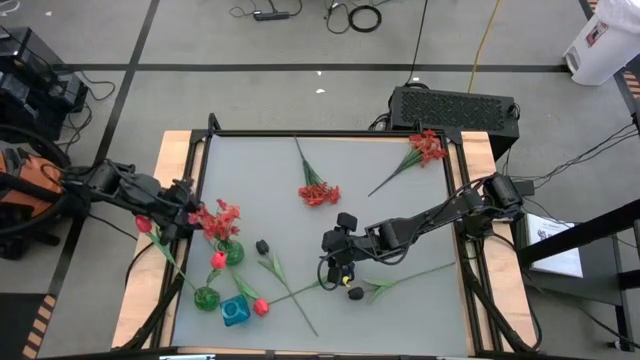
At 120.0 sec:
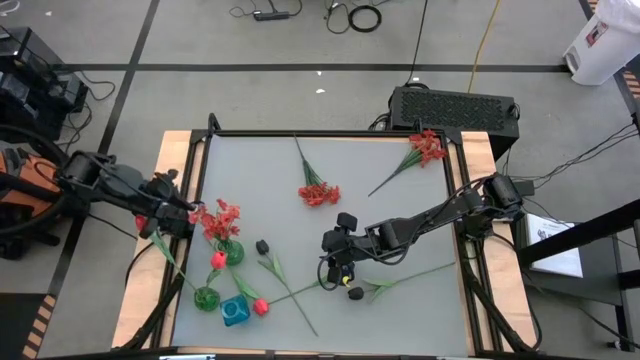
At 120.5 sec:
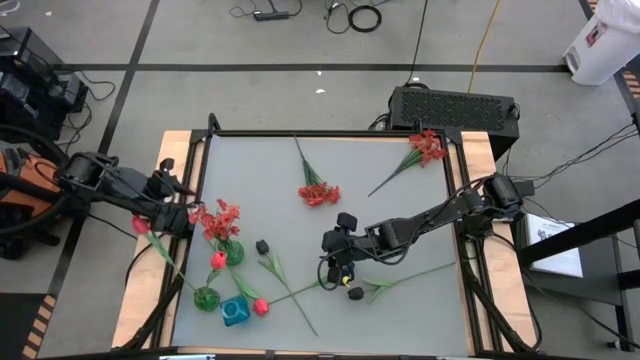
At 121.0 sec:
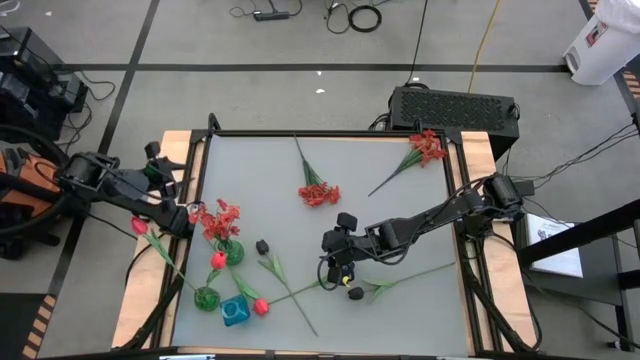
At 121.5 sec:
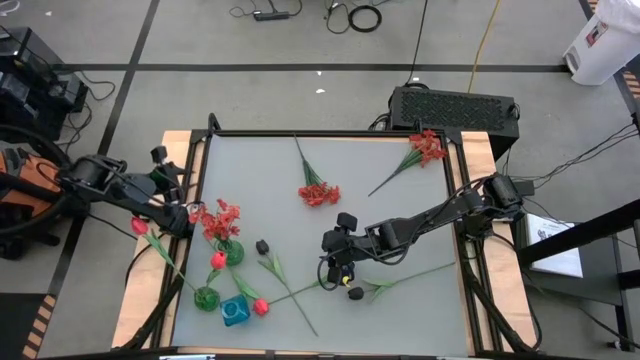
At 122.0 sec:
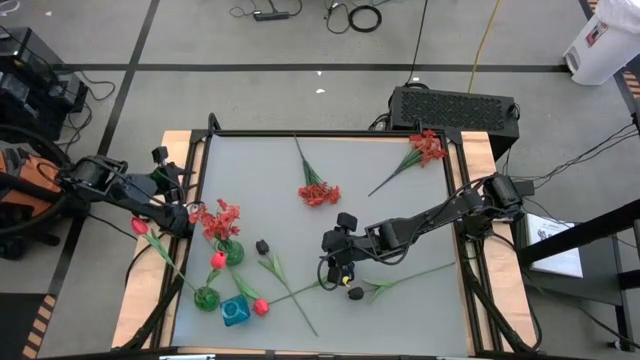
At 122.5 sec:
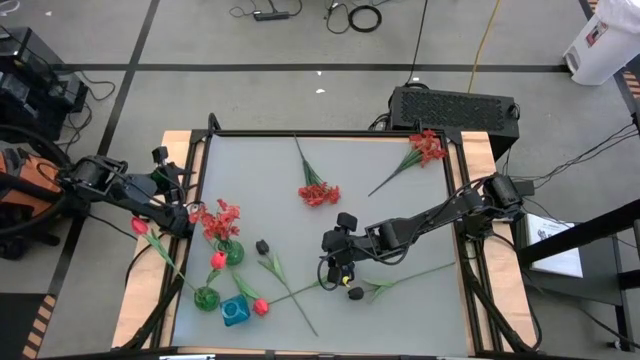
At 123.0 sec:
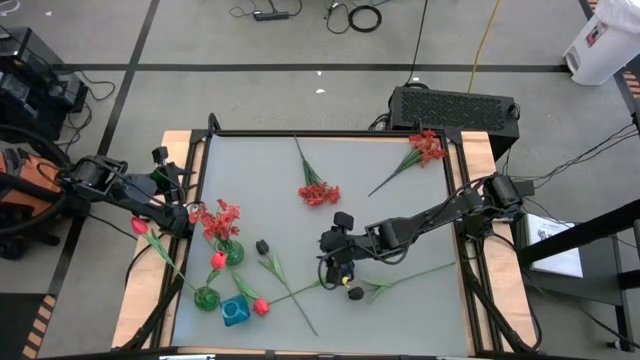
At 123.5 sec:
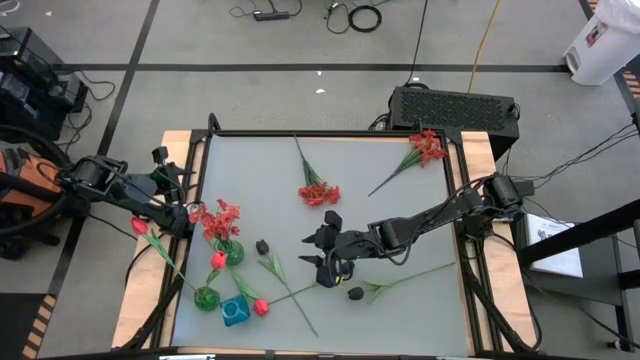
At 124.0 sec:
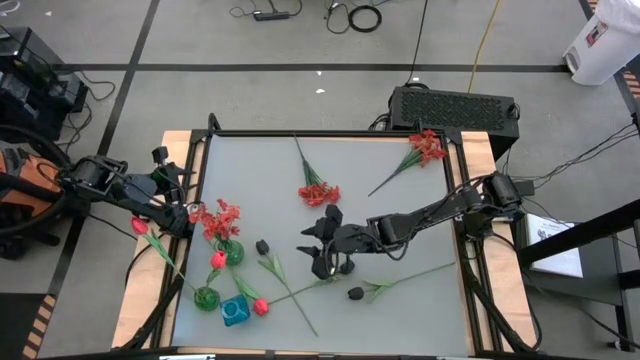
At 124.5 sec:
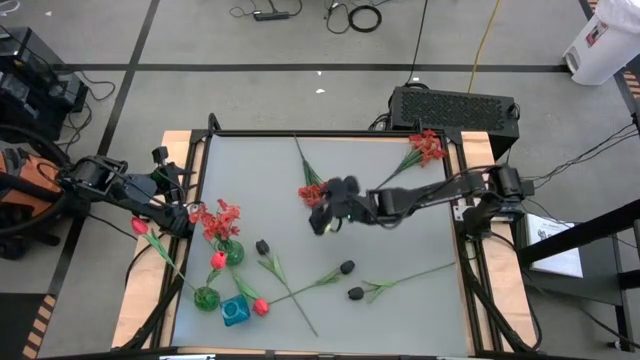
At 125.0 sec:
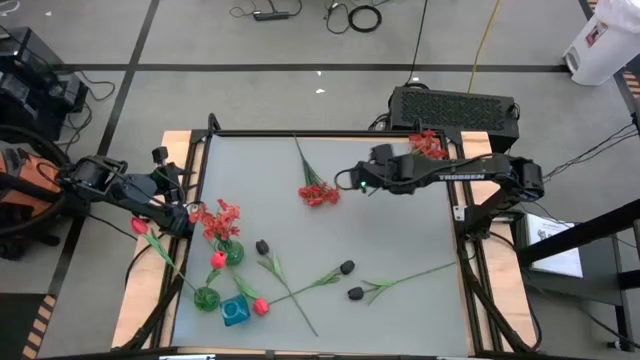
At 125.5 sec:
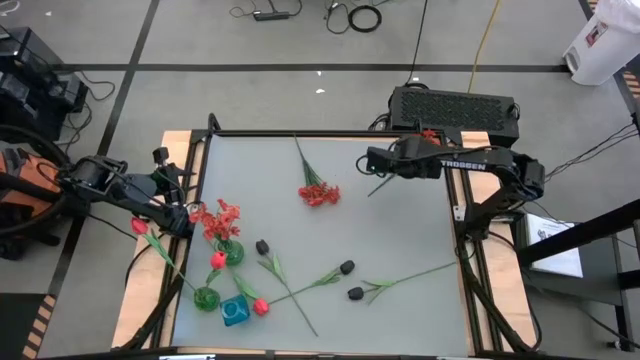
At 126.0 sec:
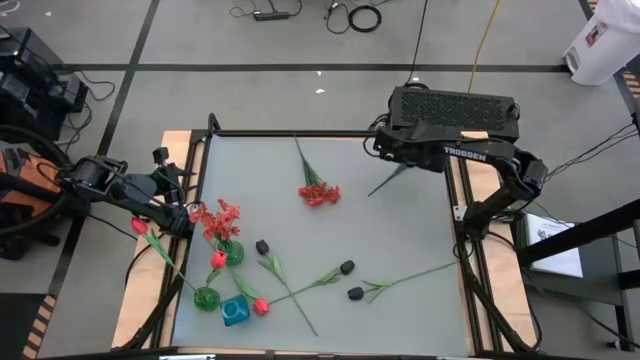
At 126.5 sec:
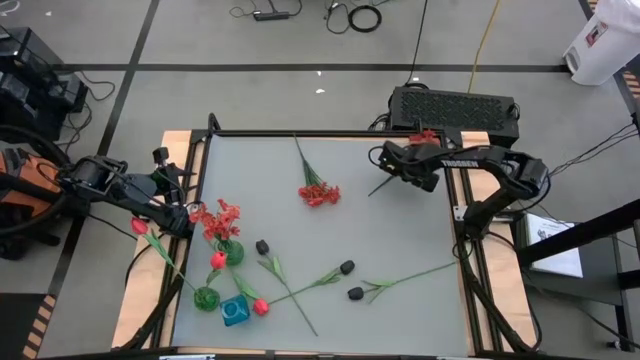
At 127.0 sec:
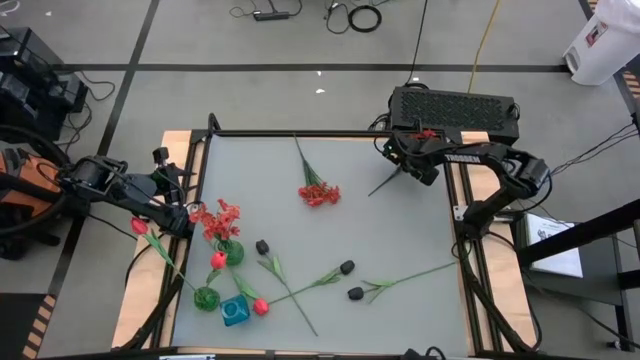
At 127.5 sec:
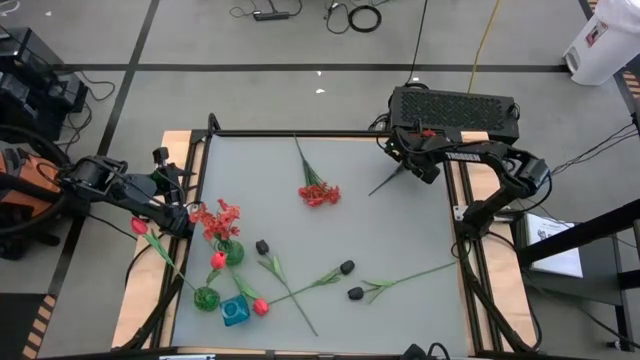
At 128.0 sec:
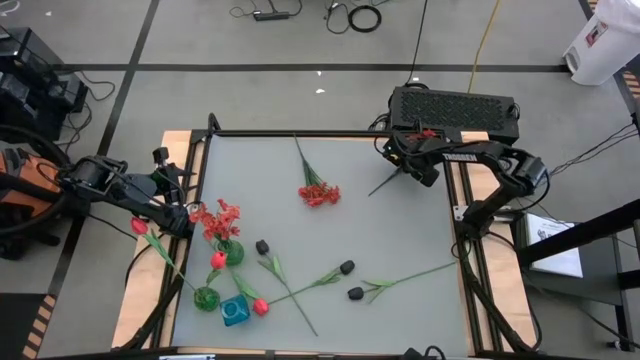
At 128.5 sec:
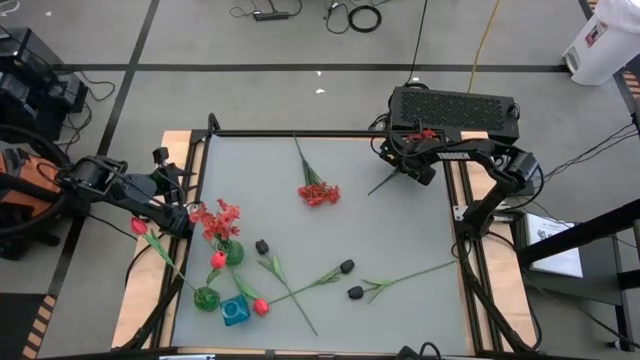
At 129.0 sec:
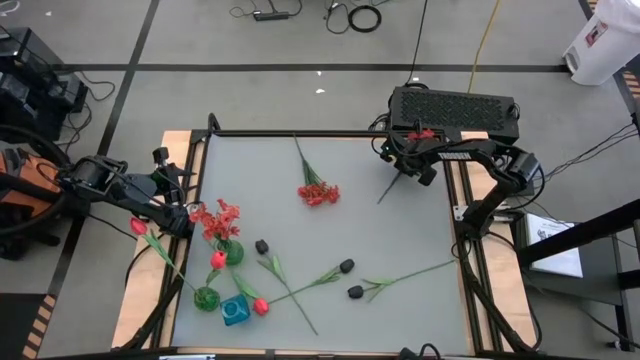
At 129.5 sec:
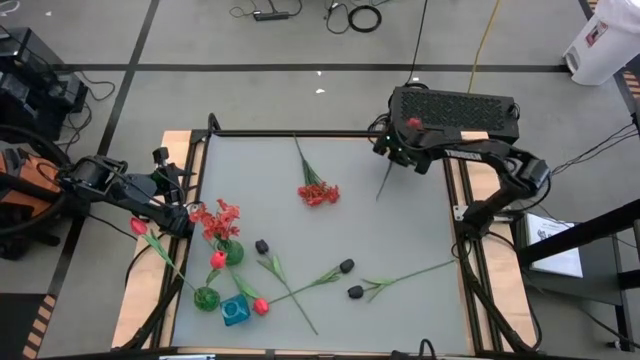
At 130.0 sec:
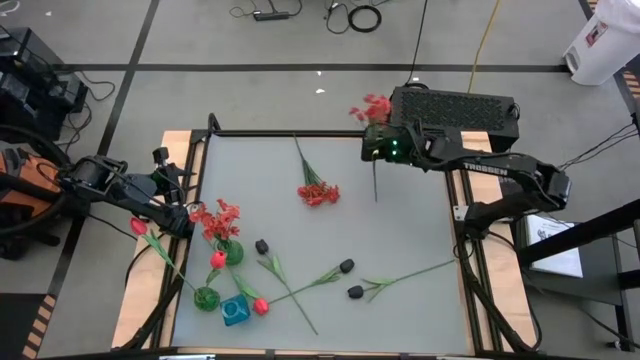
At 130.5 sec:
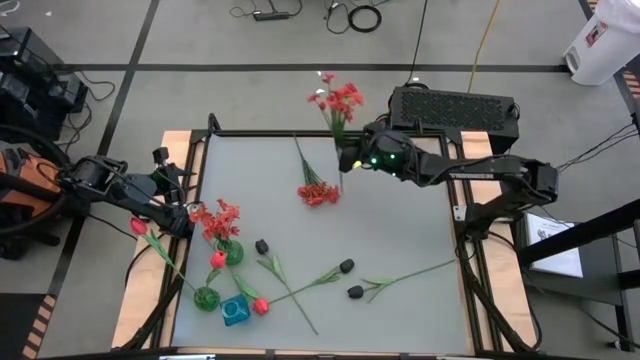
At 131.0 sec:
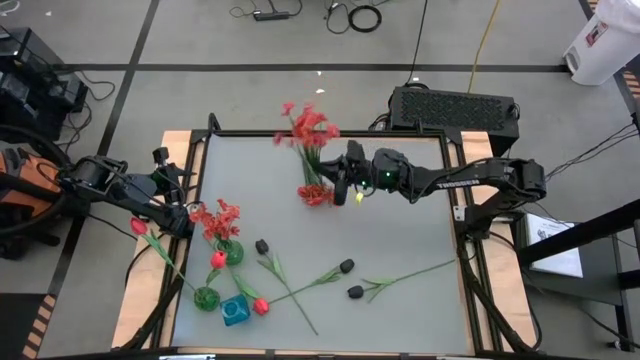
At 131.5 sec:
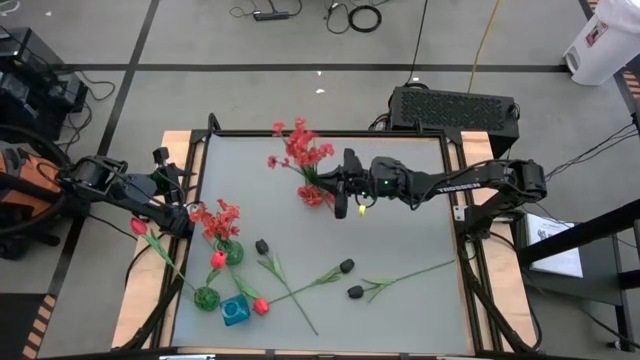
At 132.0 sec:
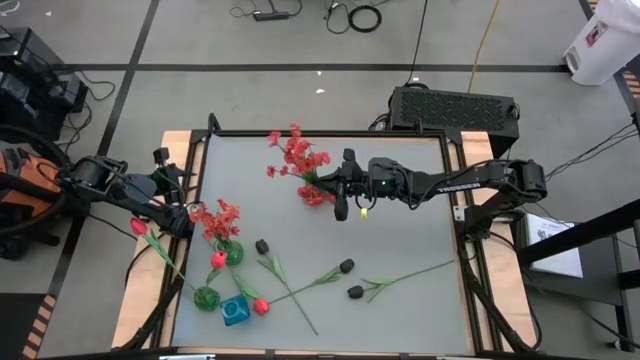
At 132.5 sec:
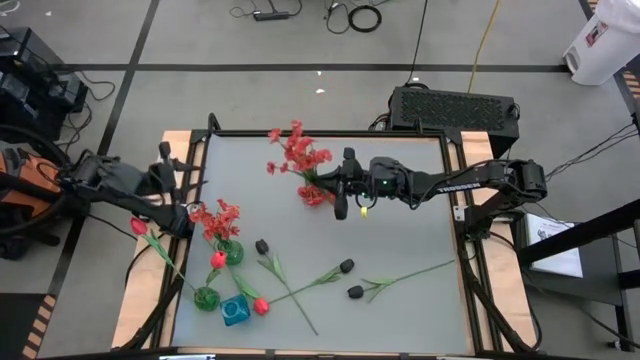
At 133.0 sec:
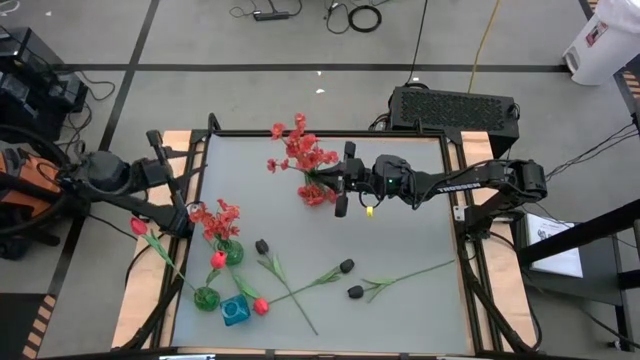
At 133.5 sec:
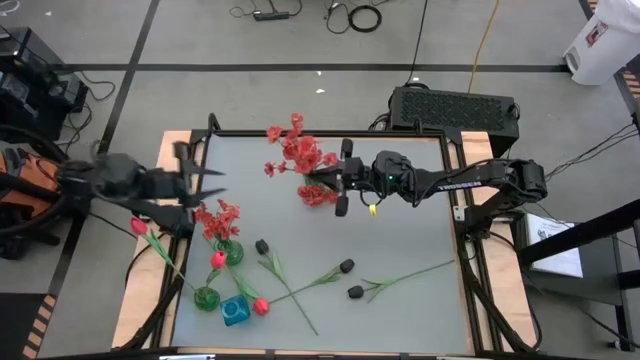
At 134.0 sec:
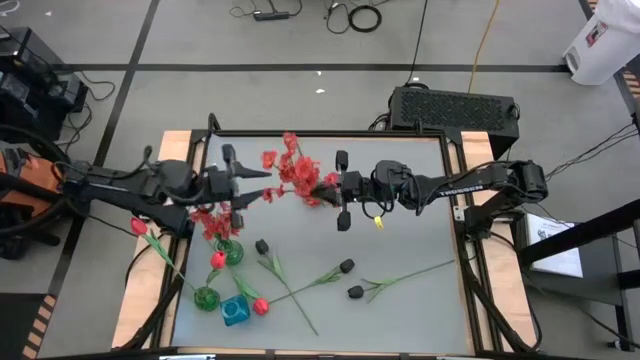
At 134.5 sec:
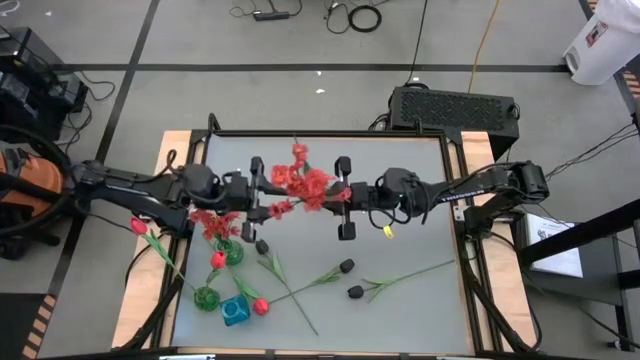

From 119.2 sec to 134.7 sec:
Task: Sort flowers into vase by color
Put the right orange flowers into the top green vase

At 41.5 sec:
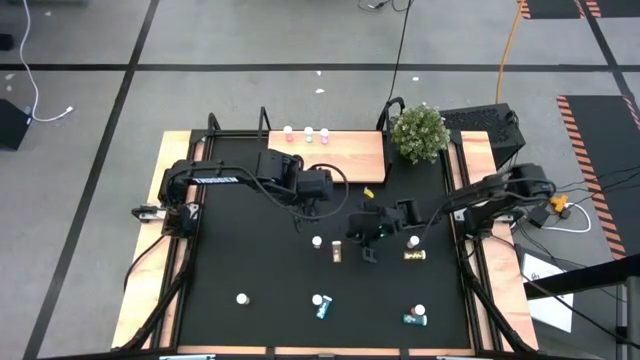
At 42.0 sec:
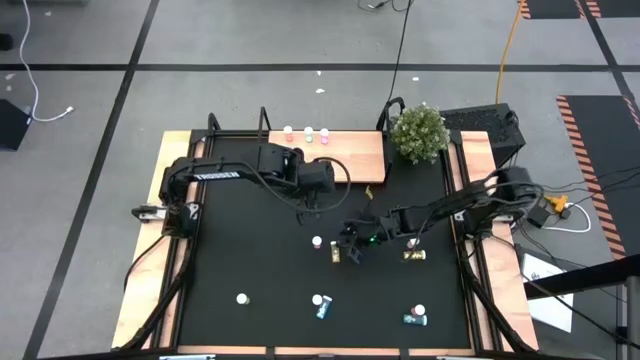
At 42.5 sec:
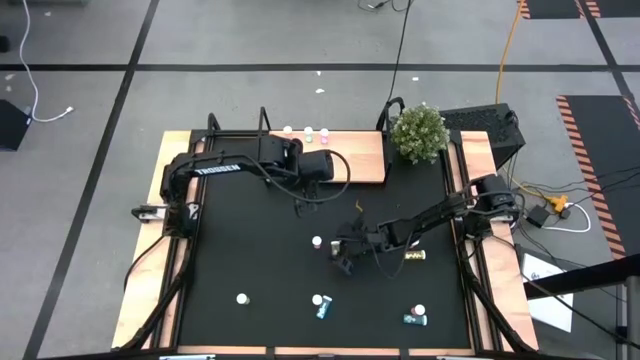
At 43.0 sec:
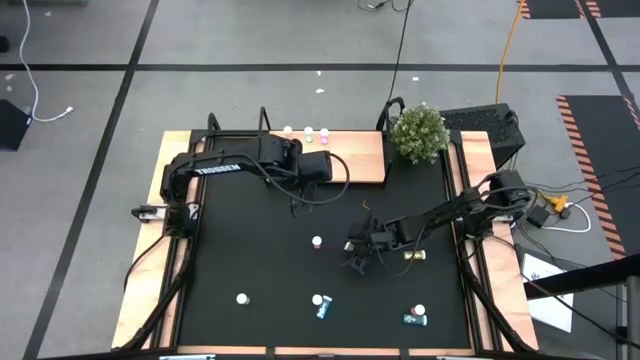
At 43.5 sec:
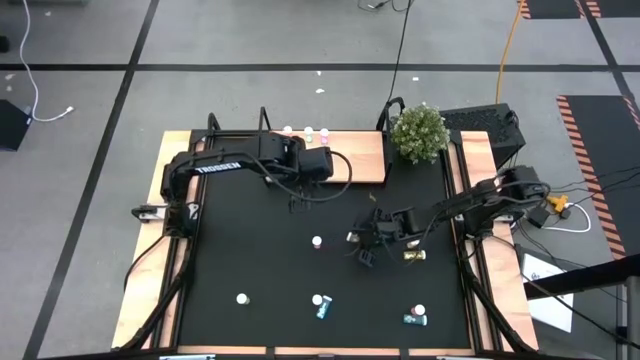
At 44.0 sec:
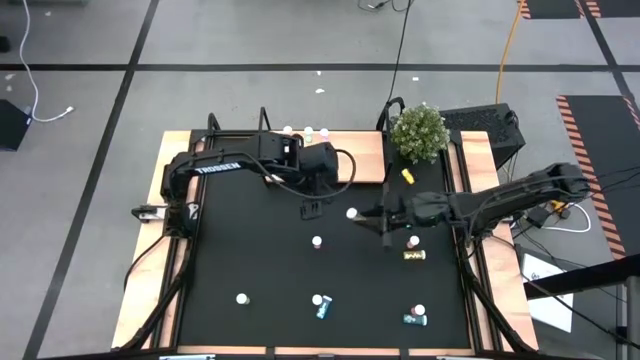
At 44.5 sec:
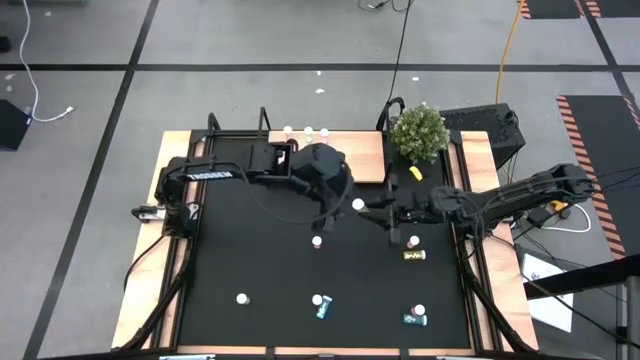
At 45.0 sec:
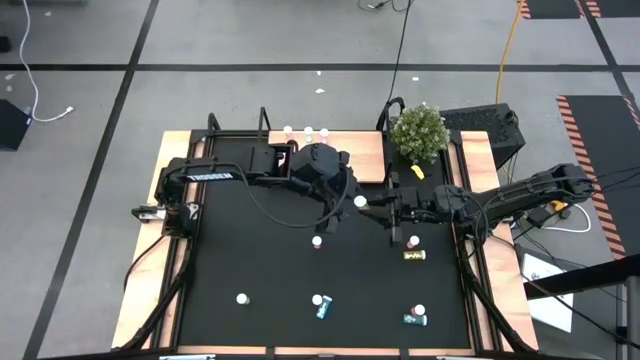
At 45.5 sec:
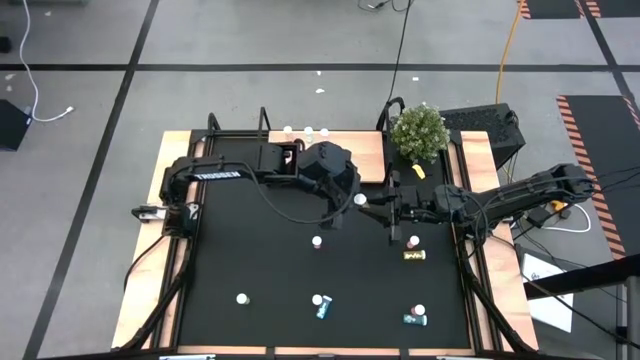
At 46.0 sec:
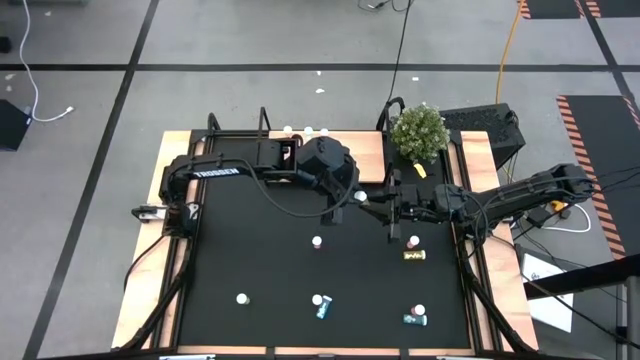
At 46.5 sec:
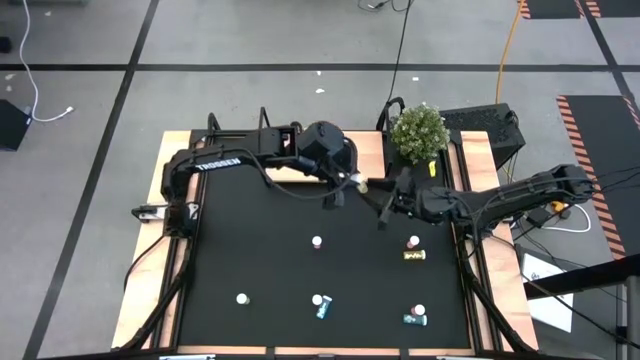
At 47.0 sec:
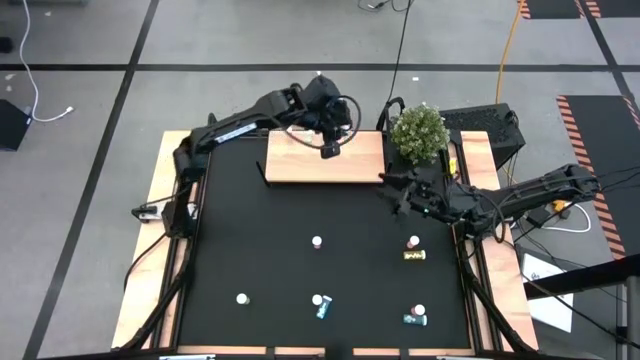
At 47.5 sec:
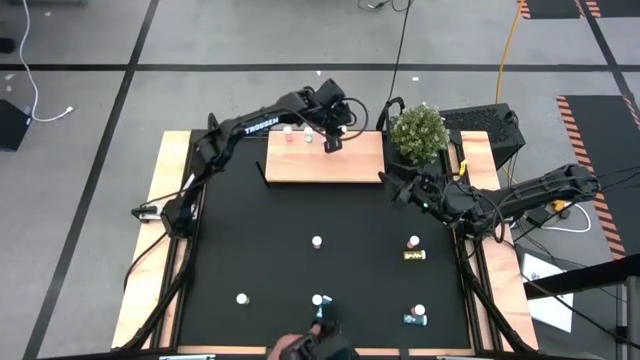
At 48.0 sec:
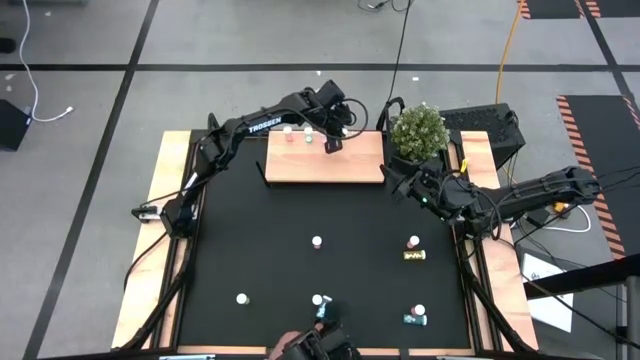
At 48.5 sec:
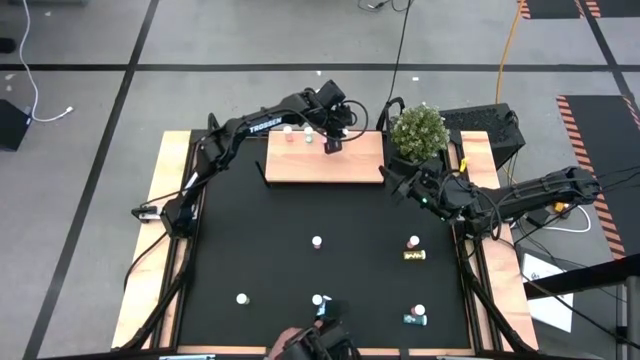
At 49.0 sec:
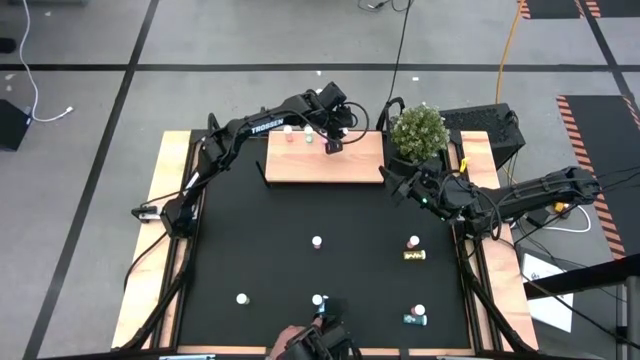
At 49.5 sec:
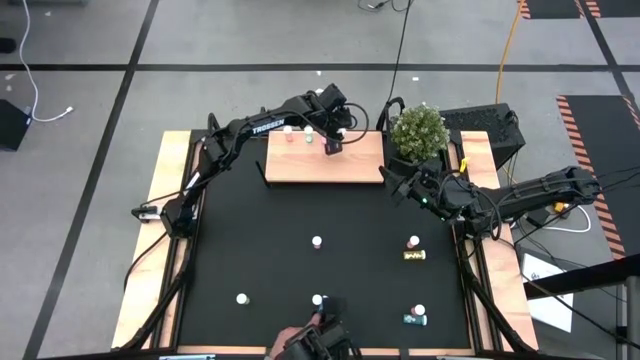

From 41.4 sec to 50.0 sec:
Task: Pick and place medicine bottles onto shelf by color
Put the top left yellow pill bottle on the shelf
